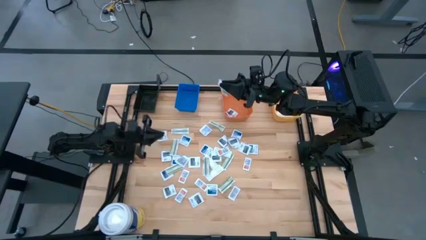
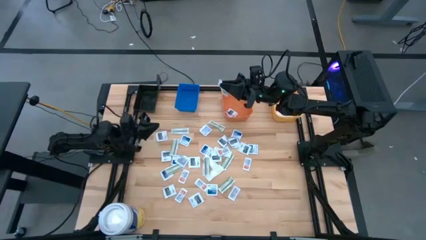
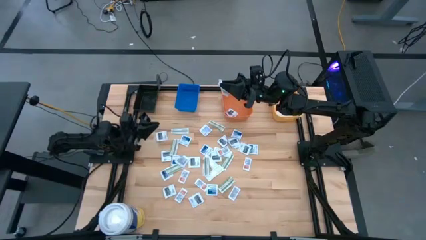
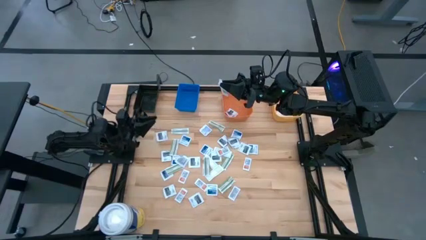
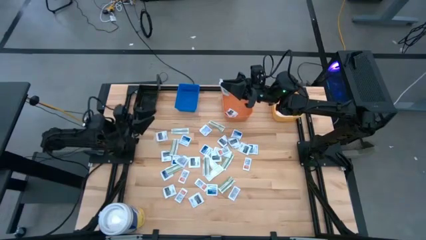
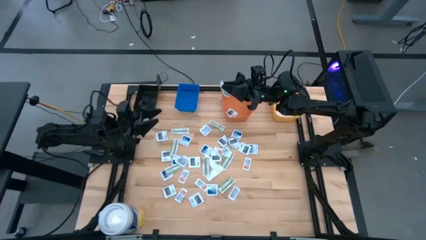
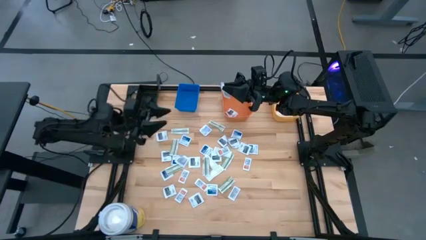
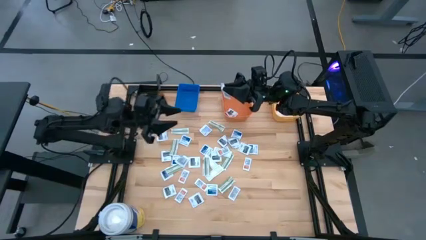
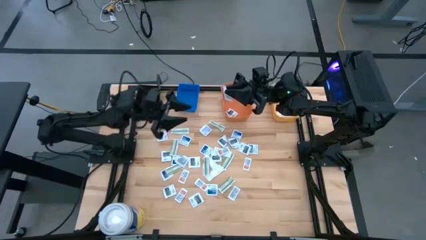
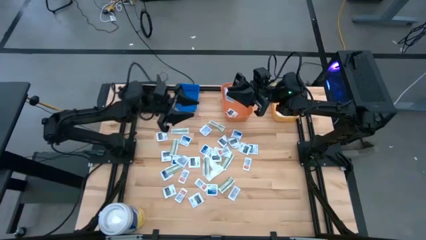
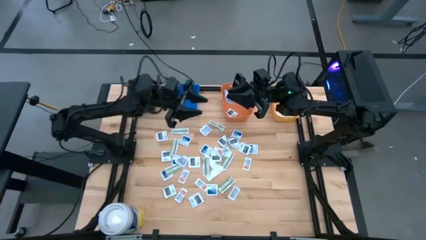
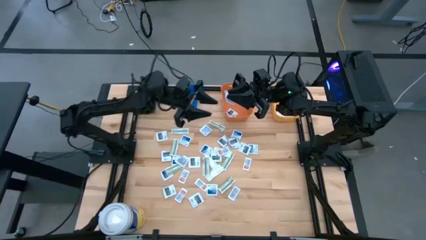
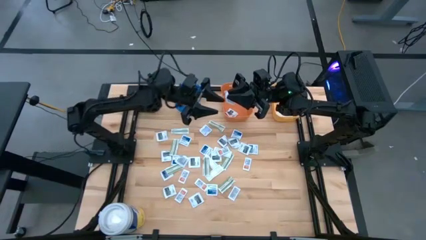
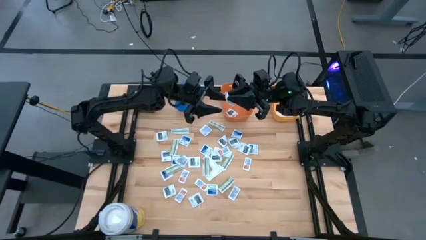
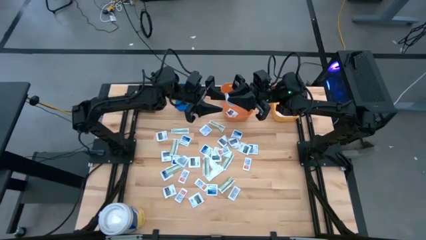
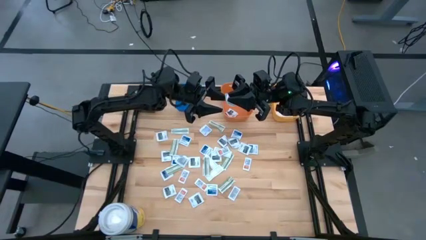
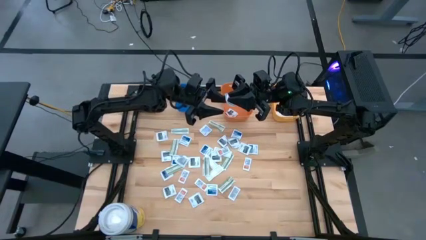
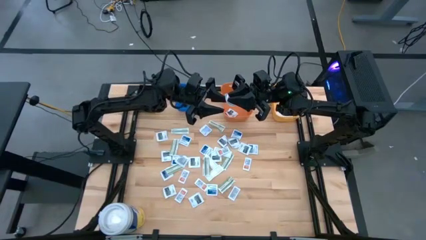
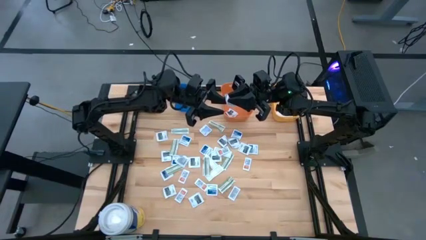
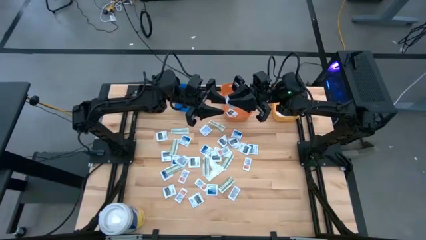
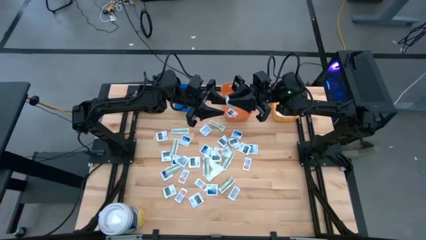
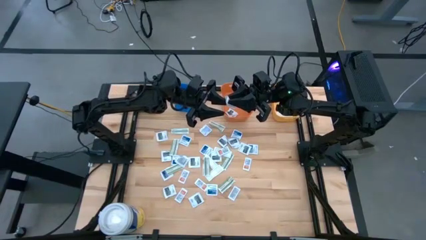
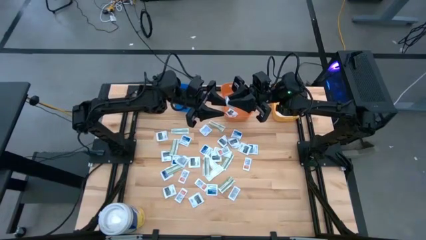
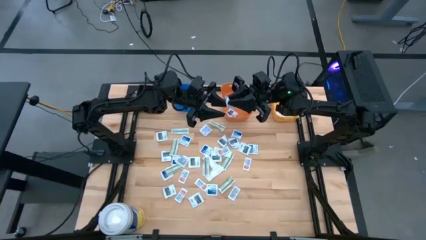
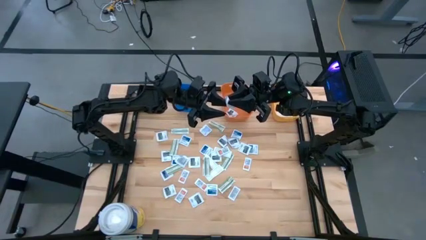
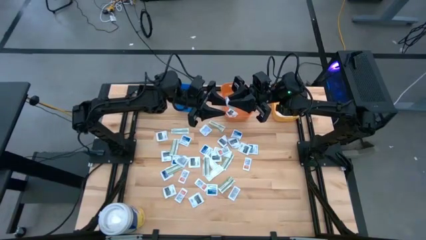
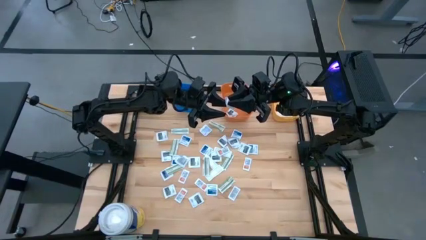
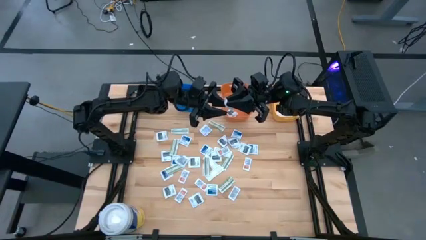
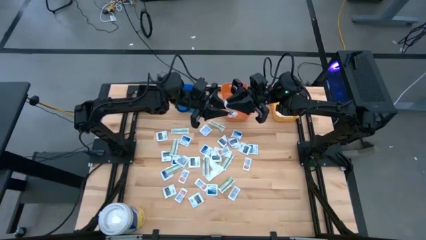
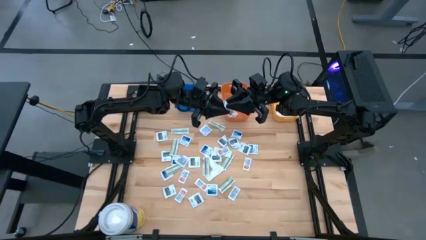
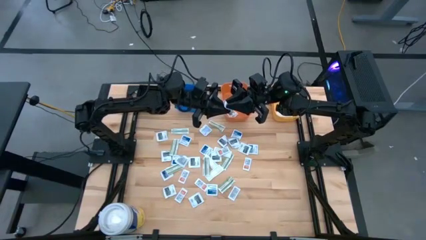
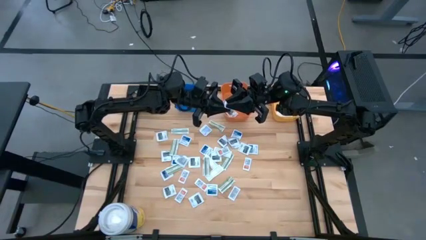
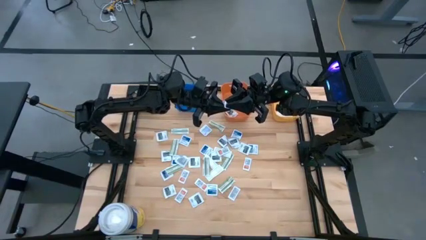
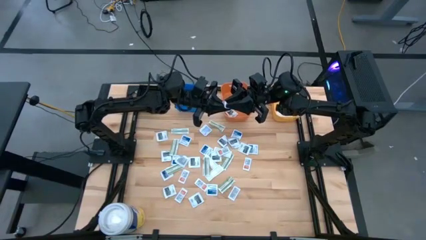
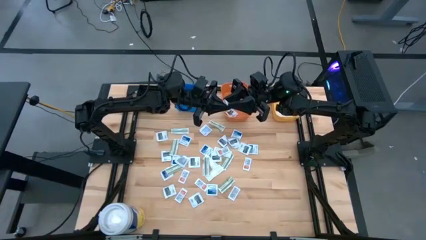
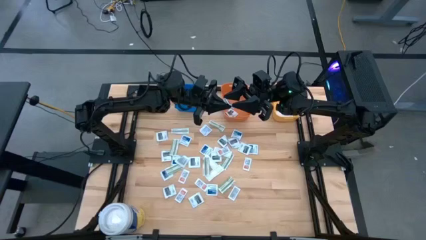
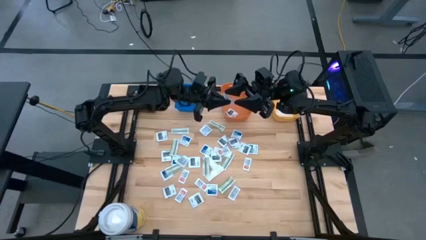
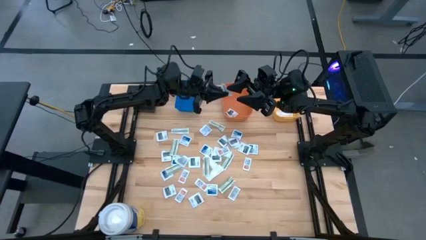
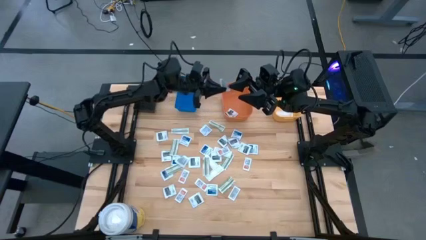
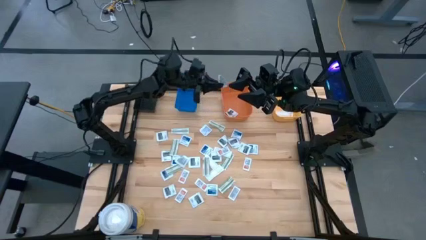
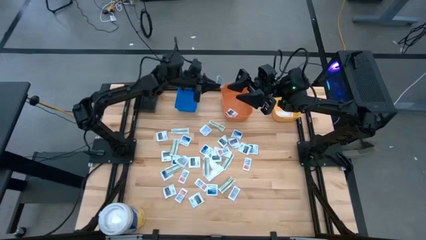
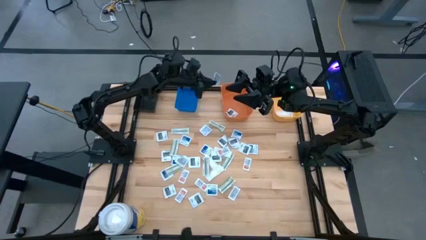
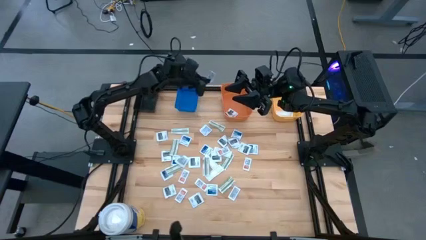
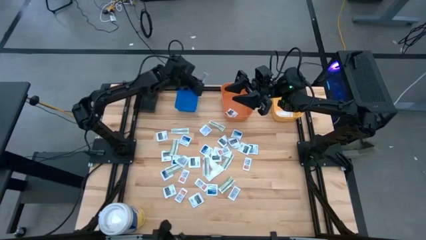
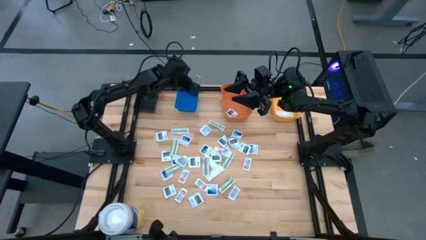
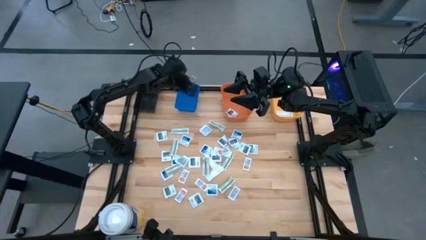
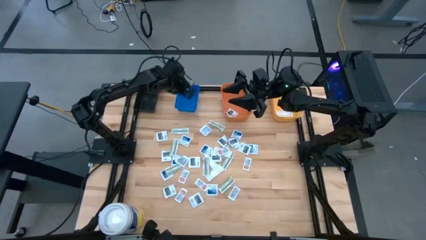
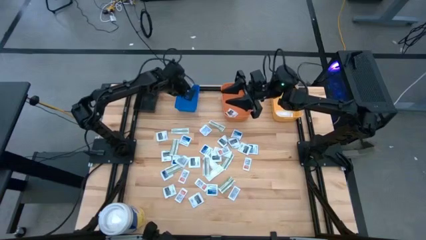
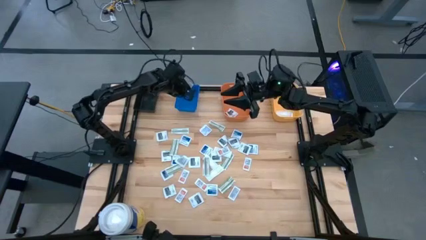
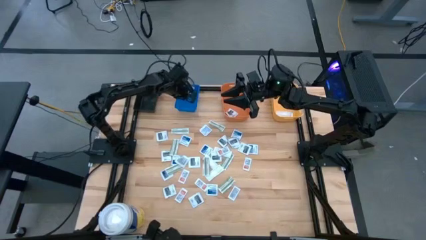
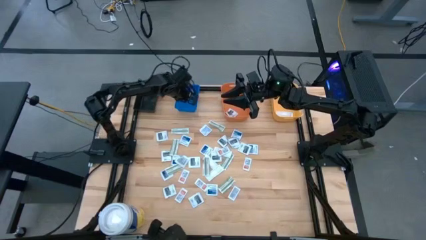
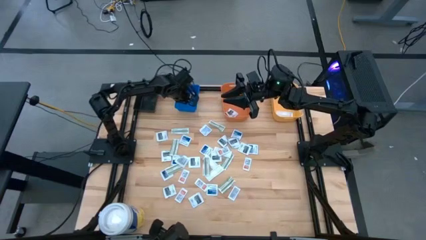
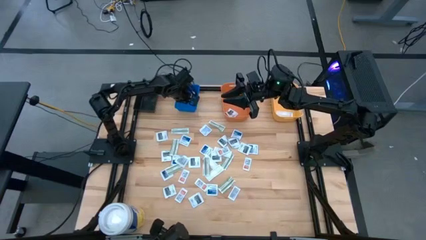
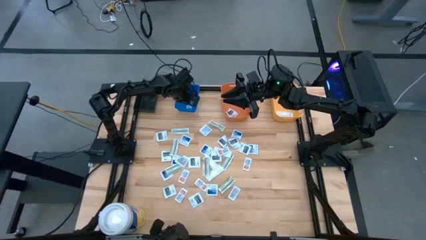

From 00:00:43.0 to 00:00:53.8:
Task: Pick & Place First Aid Supplies
Put the ointment pack into the blue bin

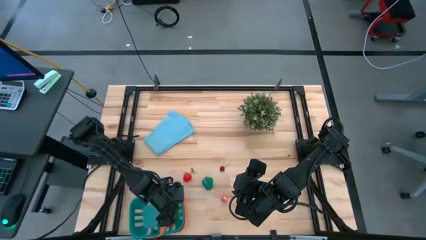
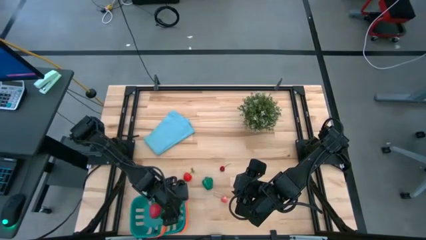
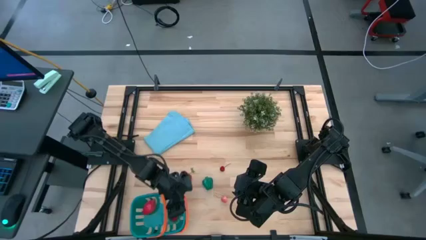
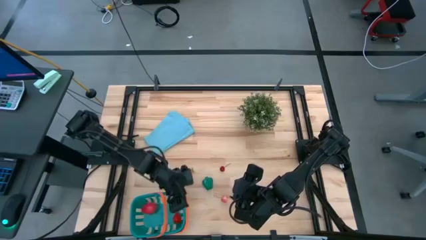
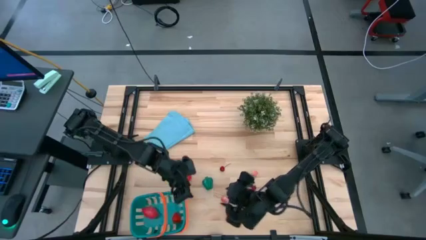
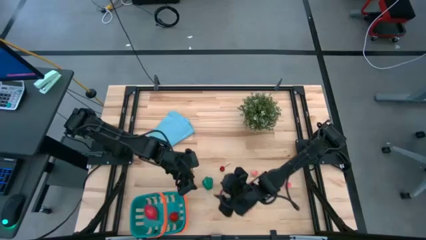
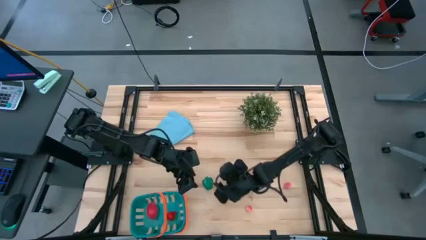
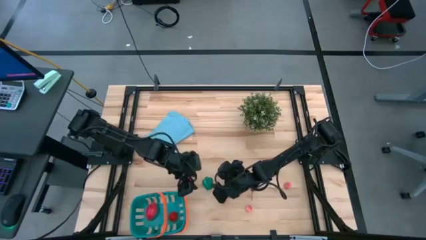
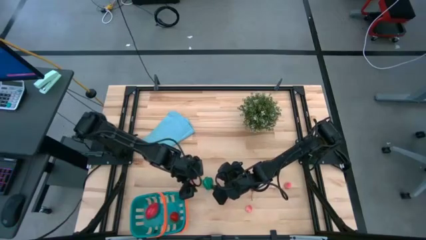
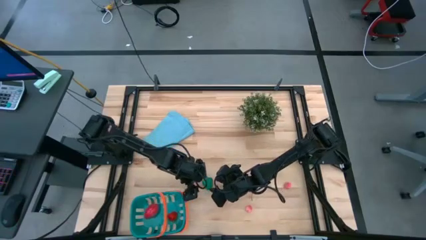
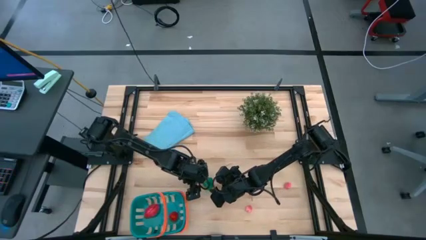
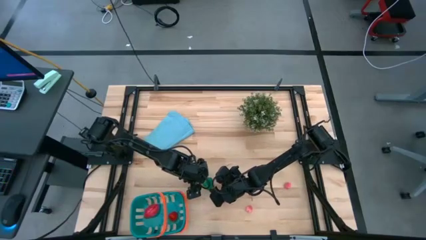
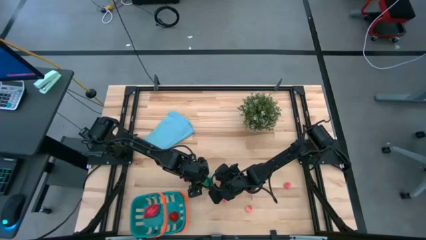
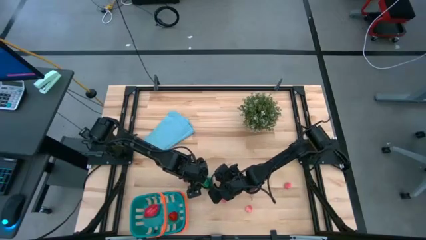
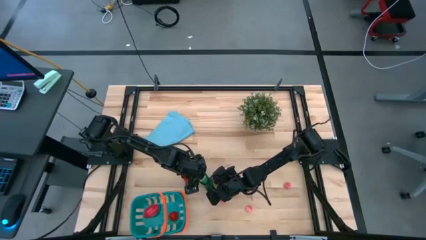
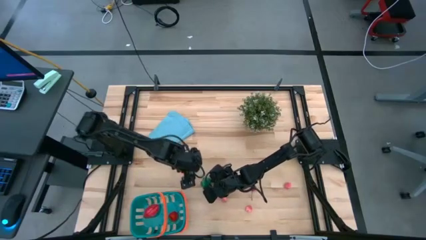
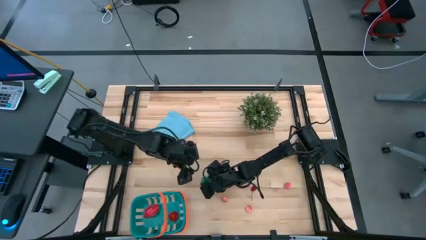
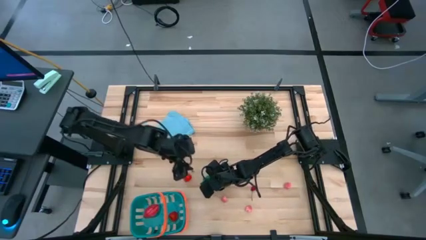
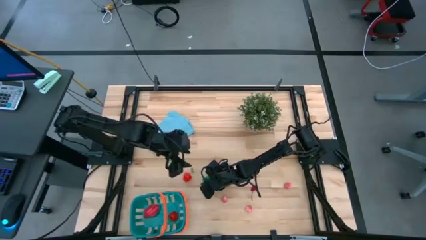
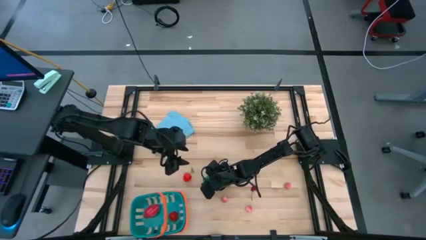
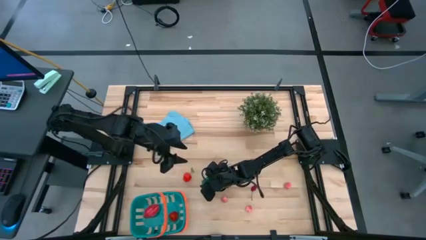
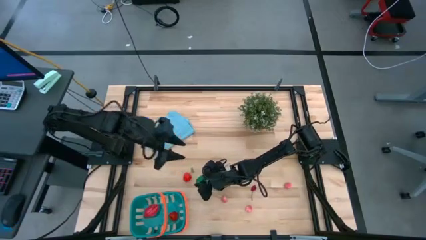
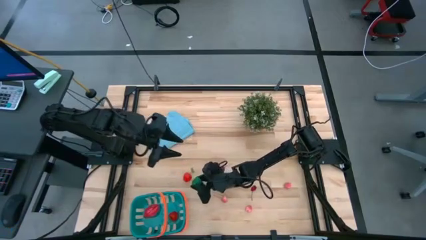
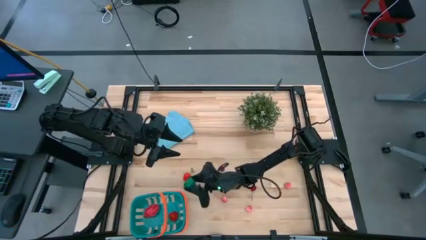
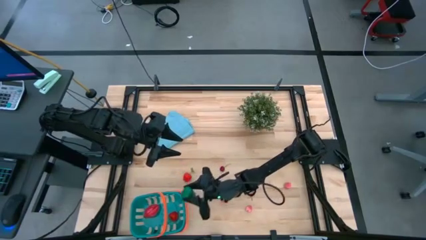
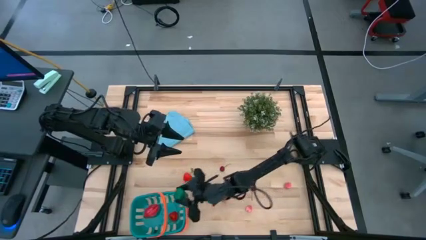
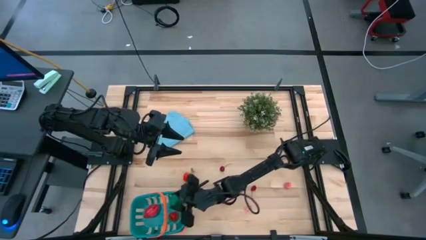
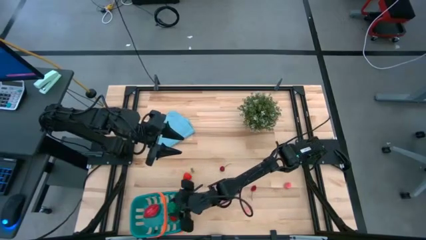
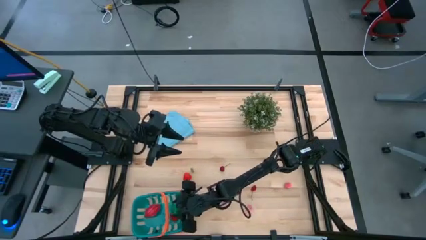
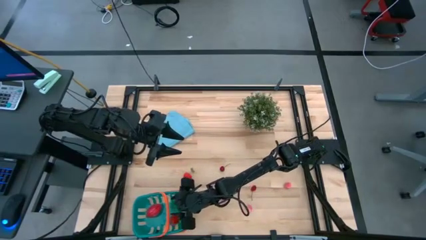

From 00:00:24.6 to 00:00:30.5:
Task: Pick and placing Produce into tupperware
Put the green bell pepper into the blue basket

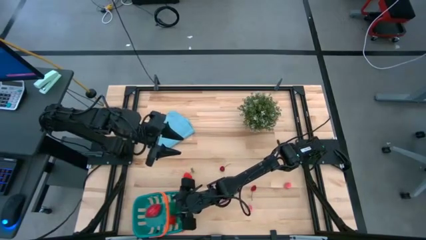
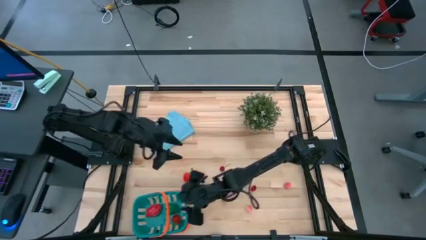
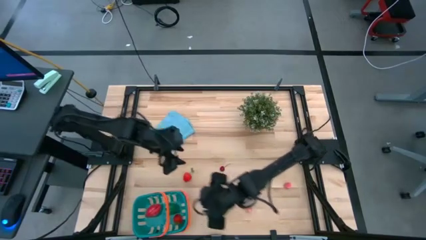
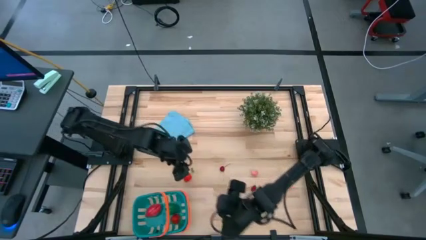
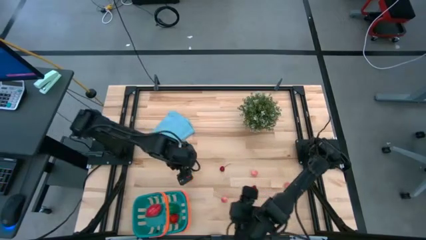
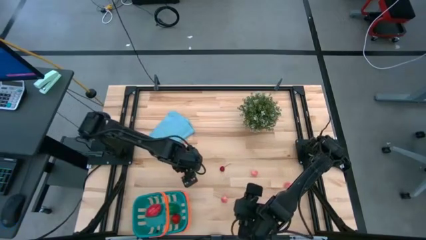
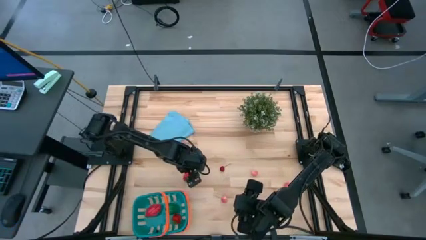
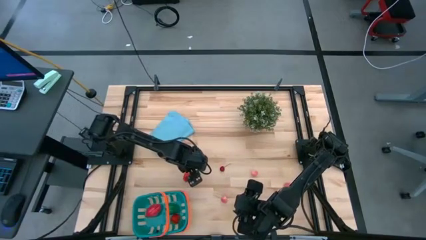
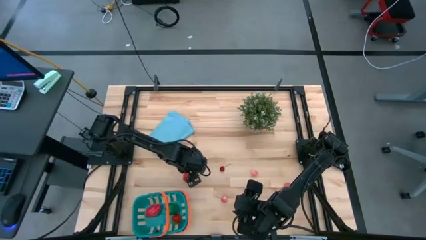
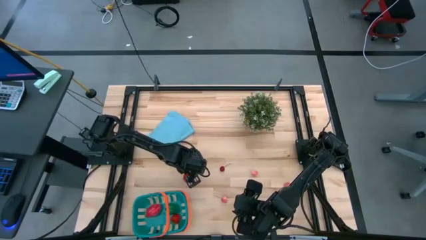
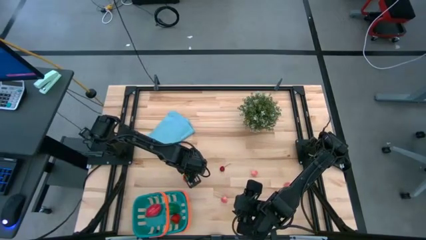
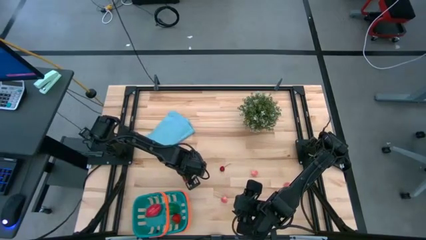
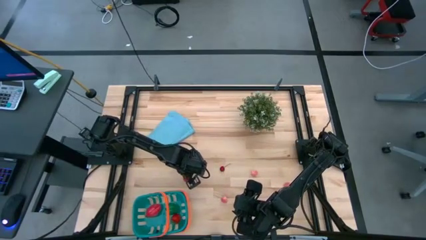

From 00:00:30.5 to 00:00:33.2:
Put the red strawberry into the blue basket
